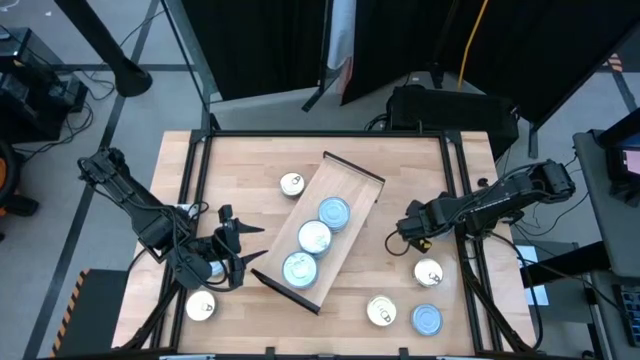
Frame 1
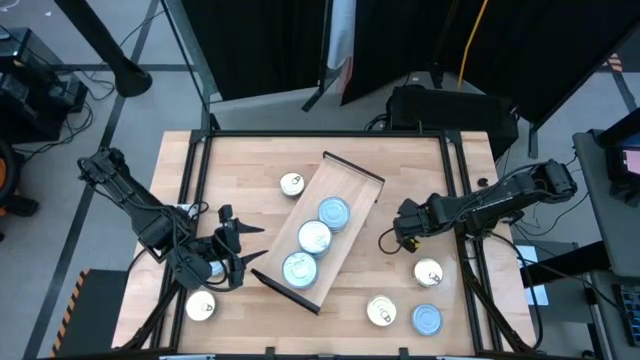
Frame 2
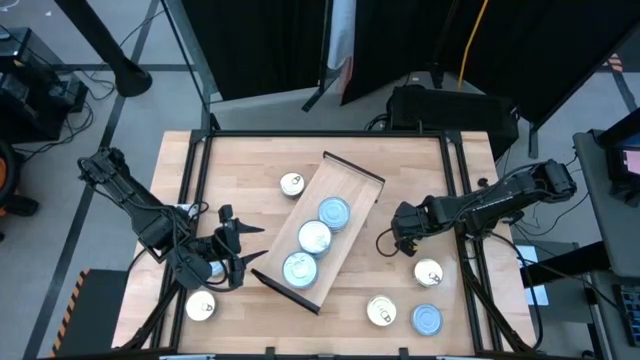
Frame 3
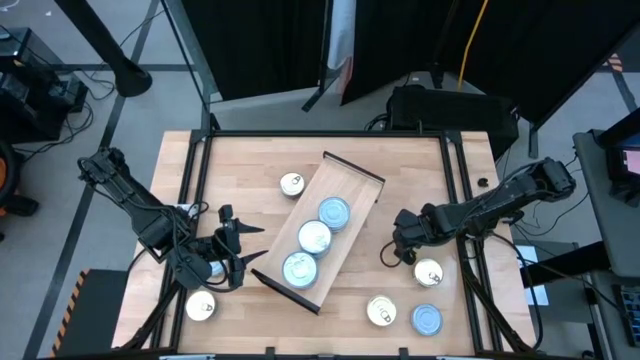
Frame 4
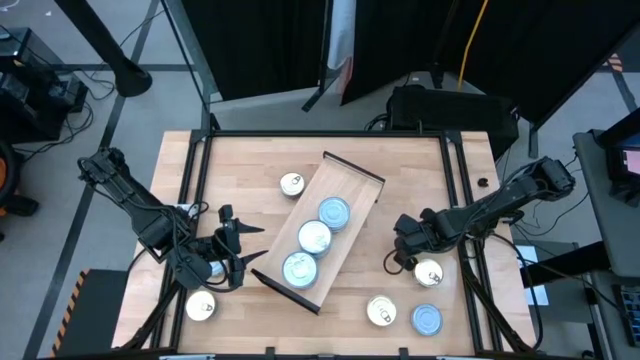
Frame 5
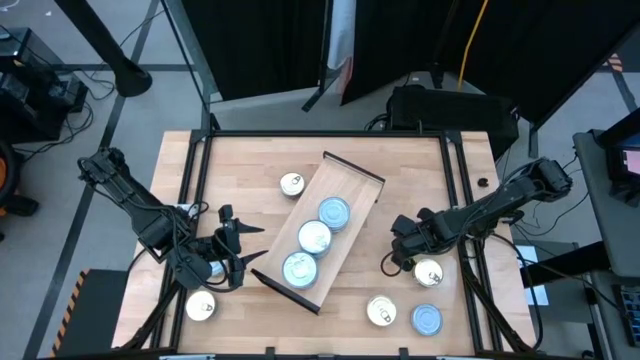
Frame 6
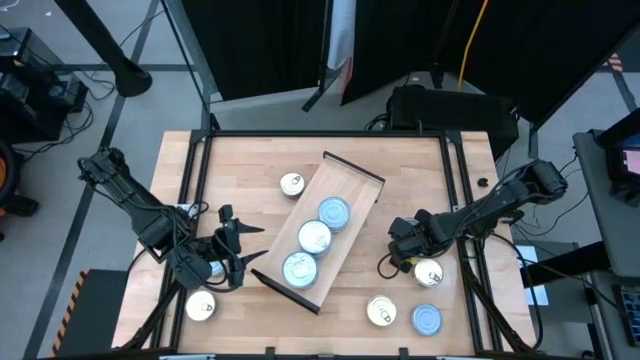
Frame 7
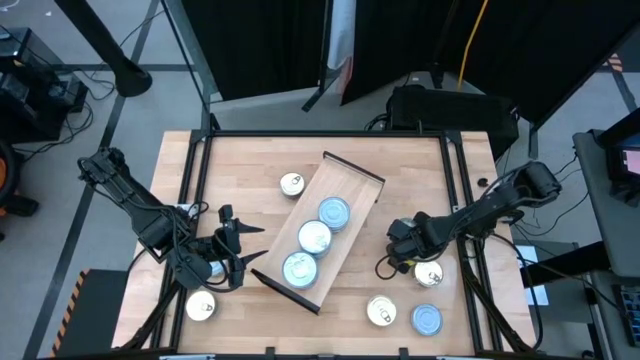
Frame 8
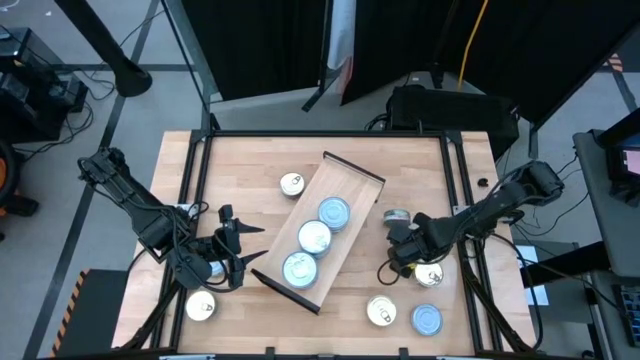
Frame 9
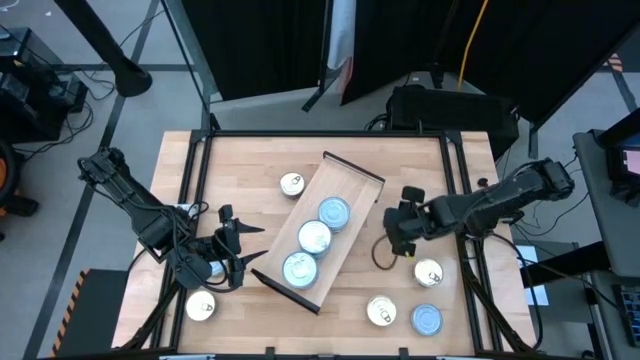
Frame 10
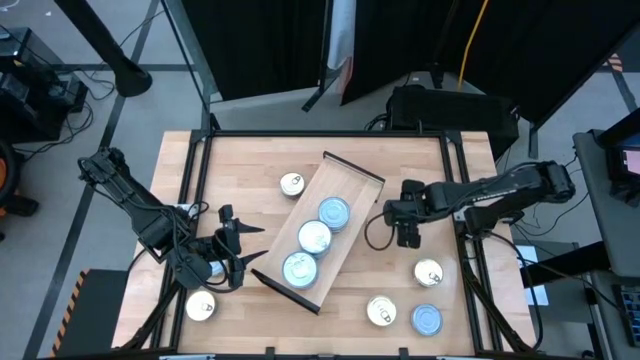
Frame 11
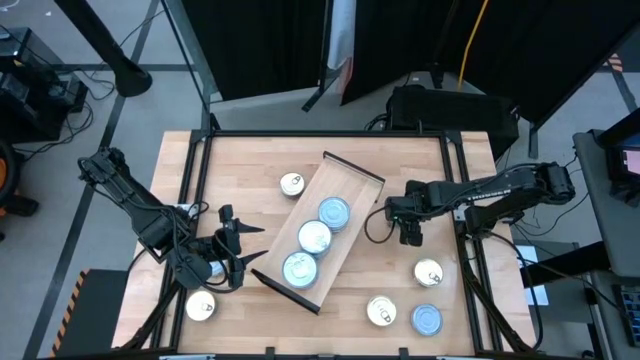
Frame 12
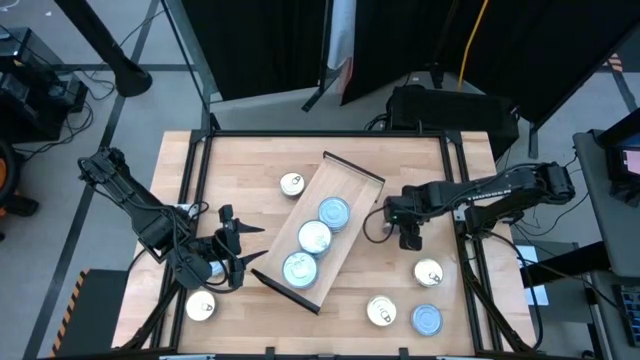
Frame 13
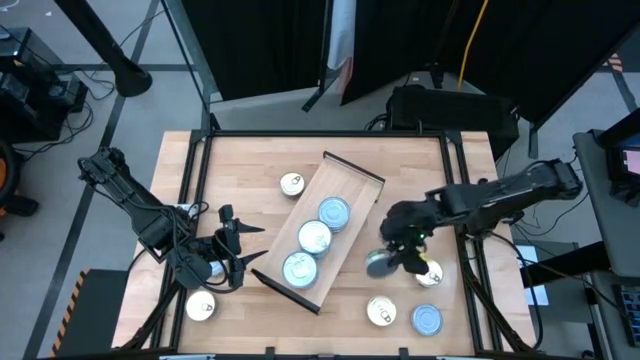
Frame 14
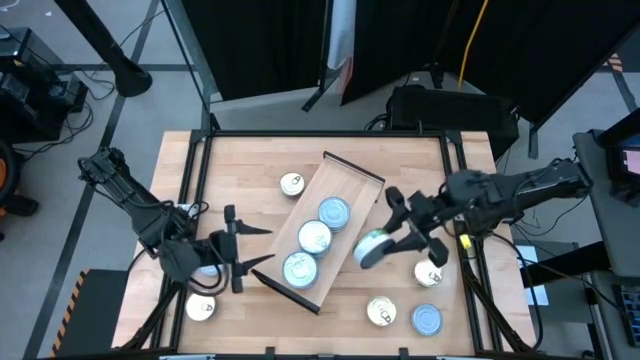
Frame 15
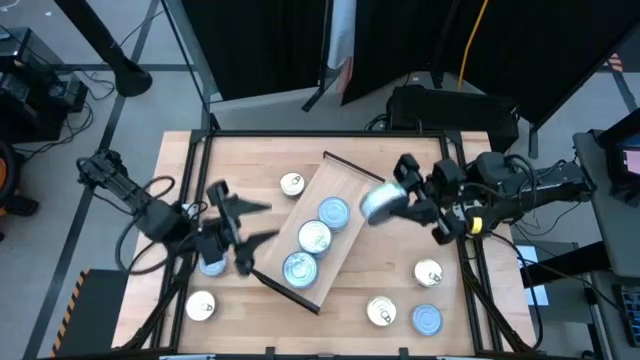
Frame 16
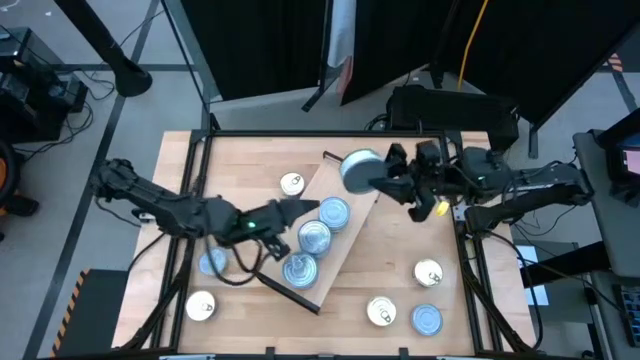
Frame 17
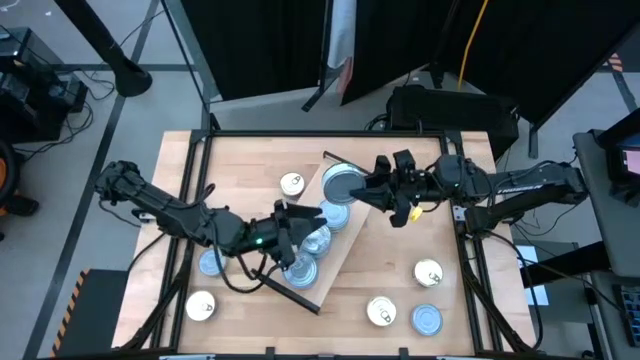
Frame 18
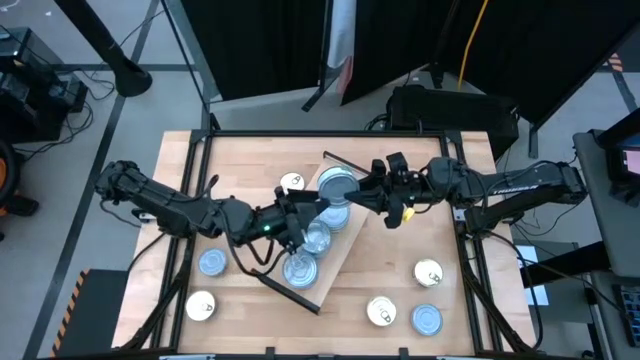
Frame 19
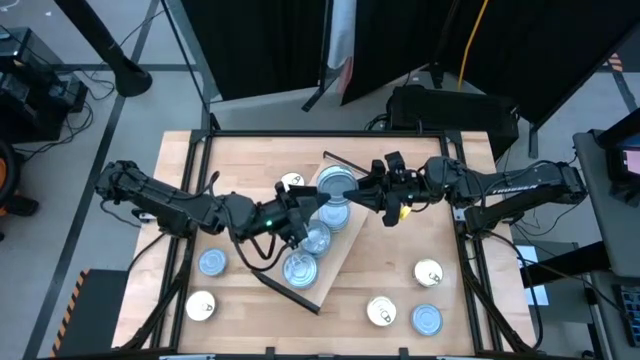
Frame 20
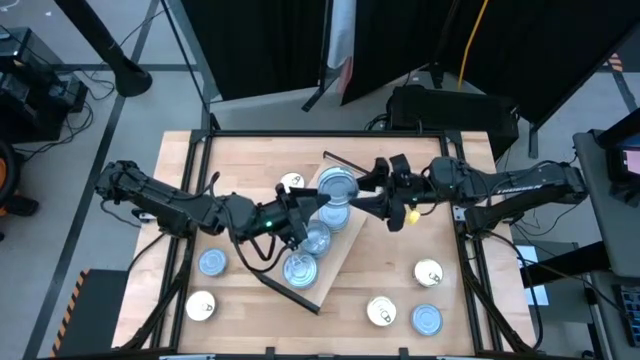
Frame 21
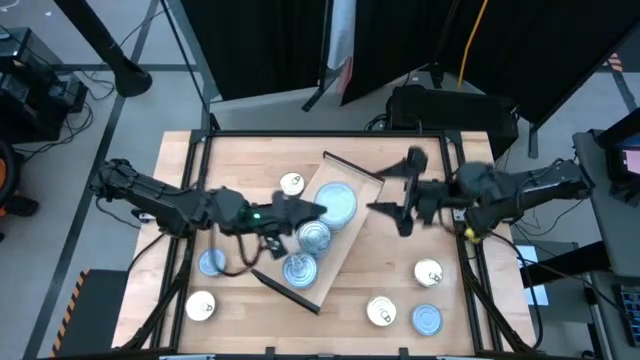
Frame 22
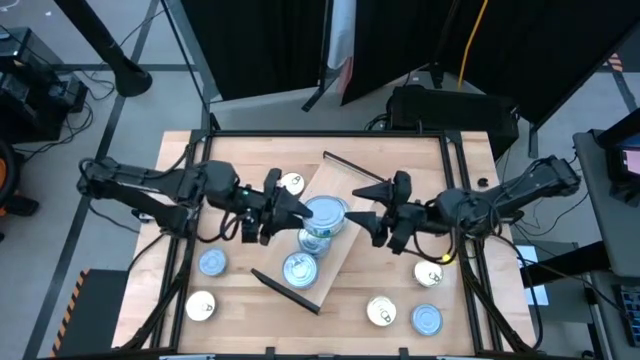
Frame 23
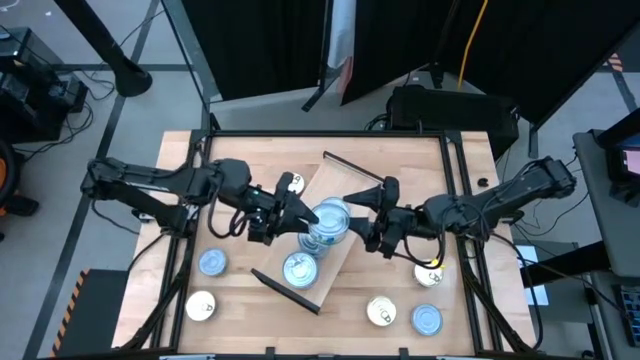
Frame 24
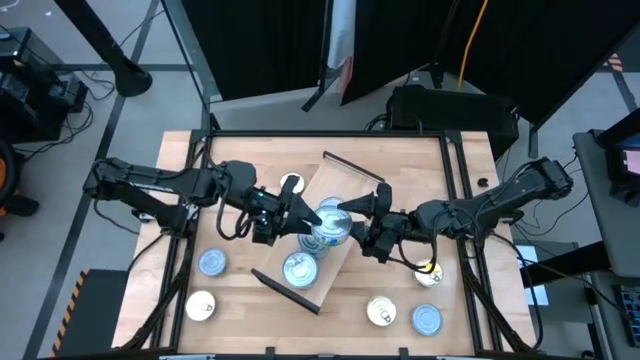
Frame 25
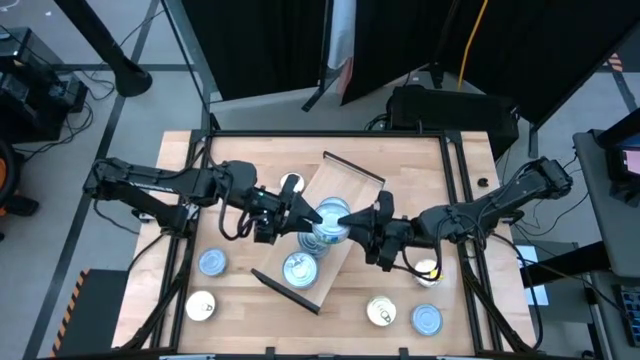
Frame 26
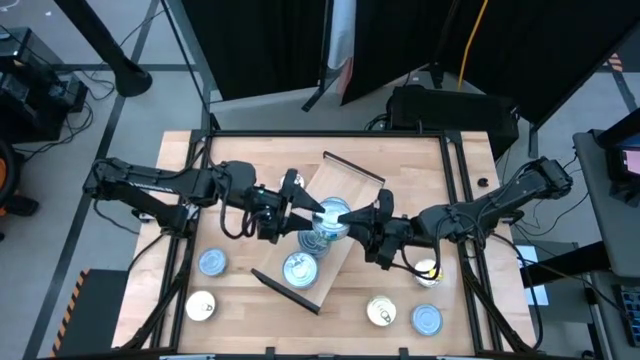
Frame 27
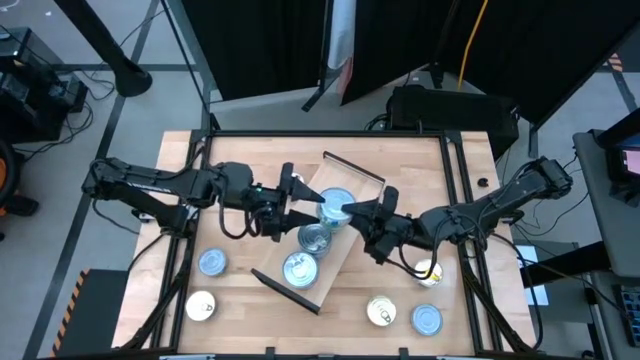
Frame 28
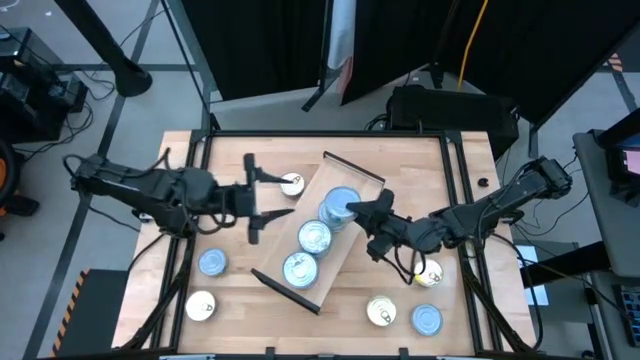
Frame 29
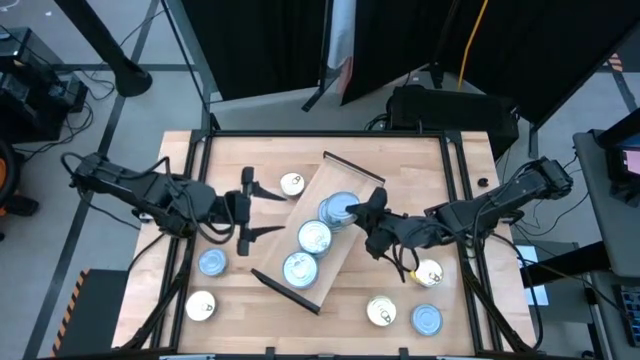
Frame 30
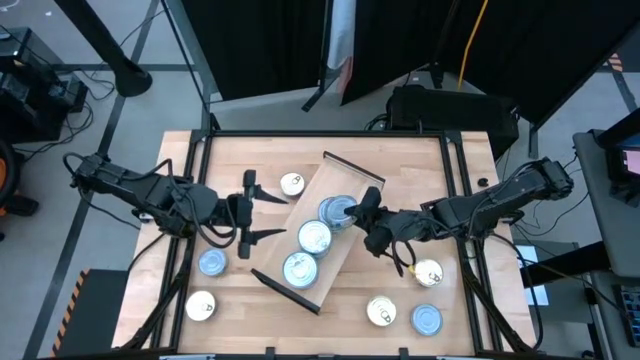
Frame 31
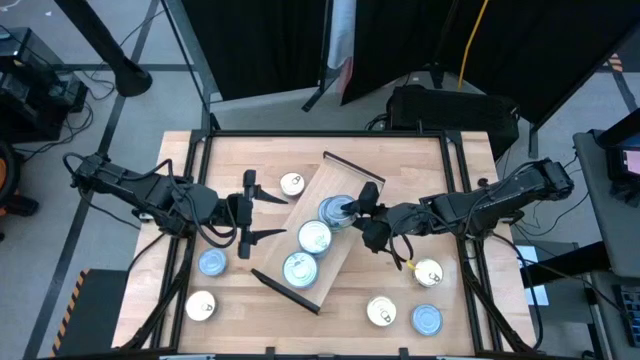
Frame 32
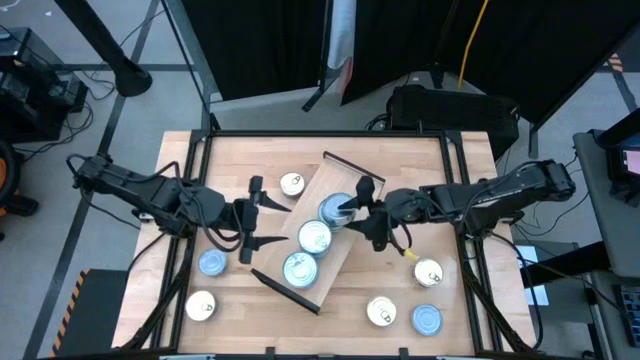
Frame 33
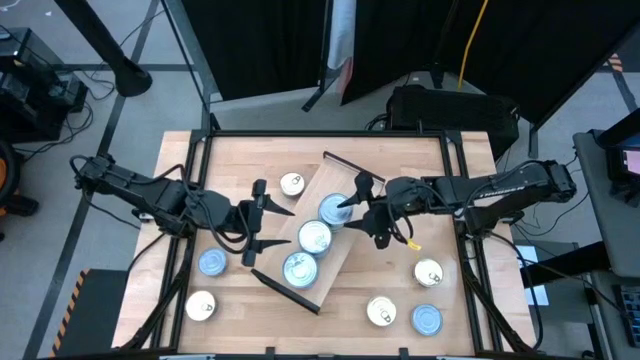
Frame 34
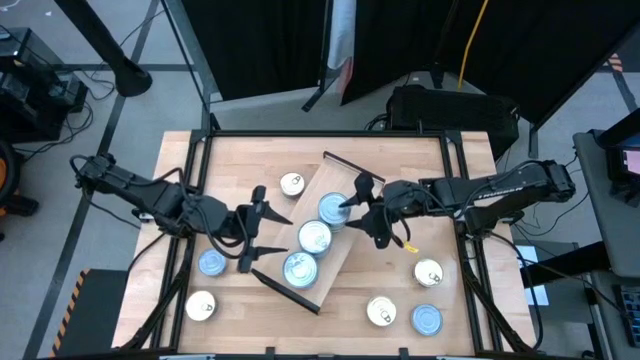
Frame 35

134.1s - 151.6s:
Task: Stack canned seafood by type on shelf
Stack the green tuna can on top of the other green tuna can on the shelf

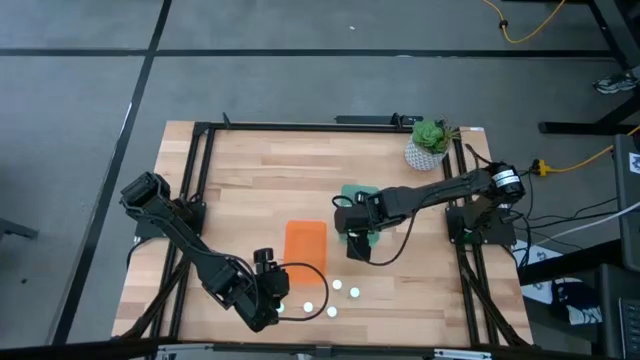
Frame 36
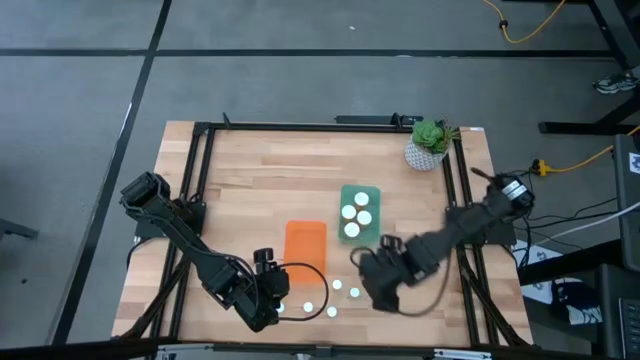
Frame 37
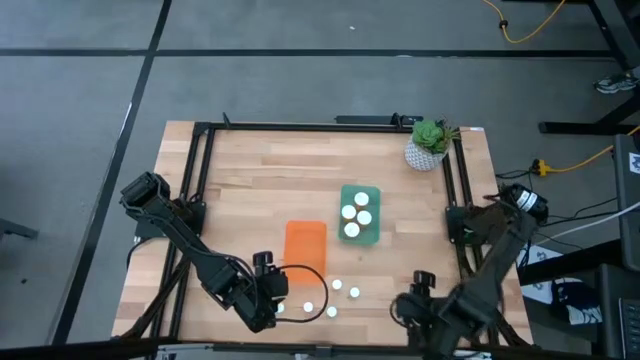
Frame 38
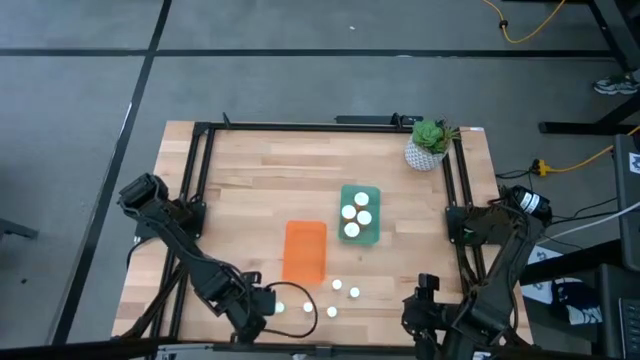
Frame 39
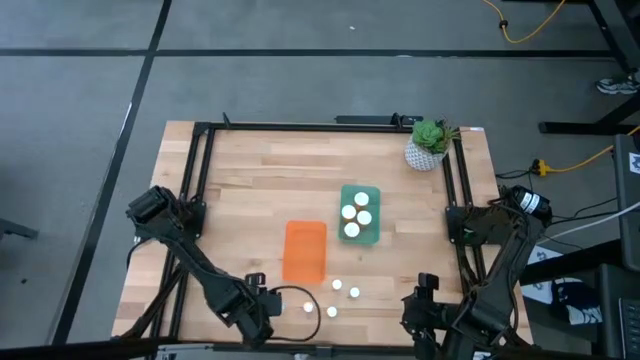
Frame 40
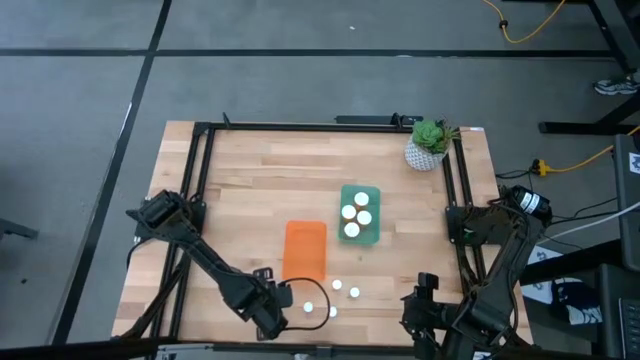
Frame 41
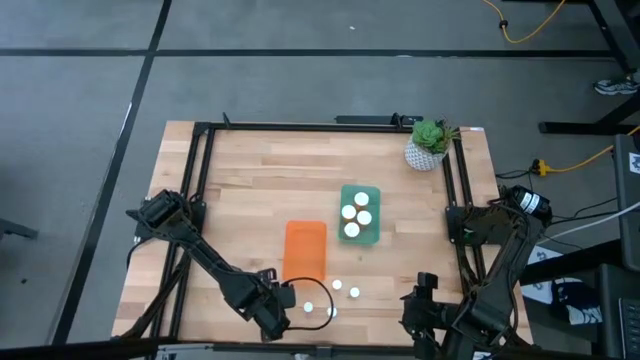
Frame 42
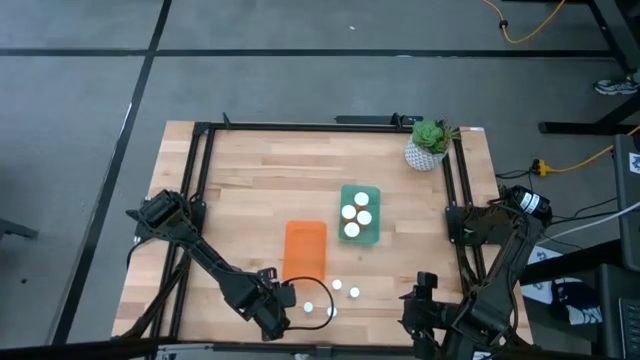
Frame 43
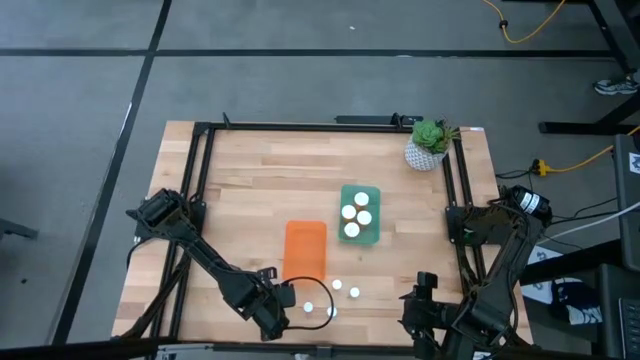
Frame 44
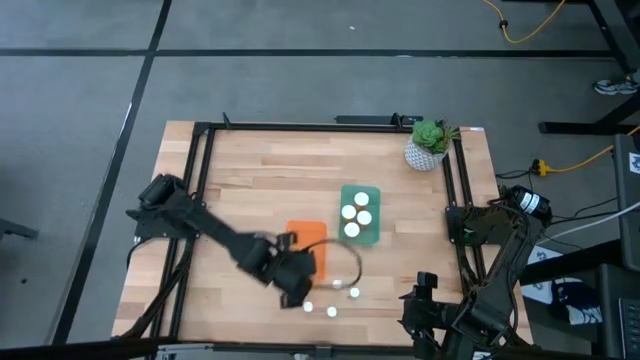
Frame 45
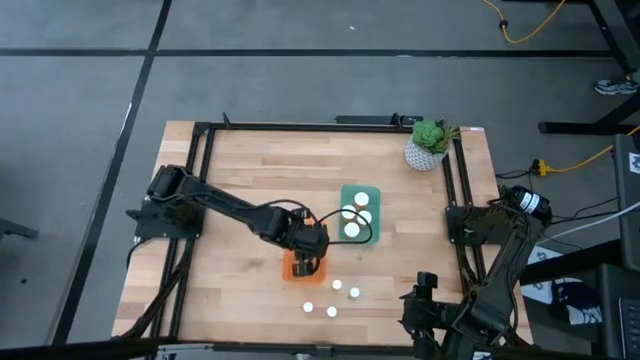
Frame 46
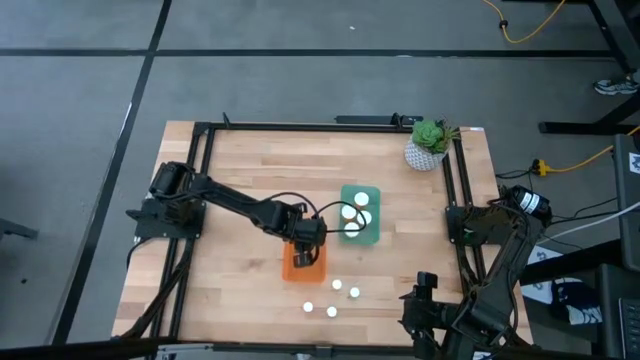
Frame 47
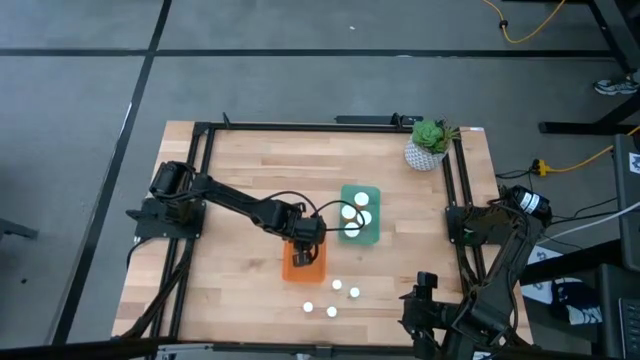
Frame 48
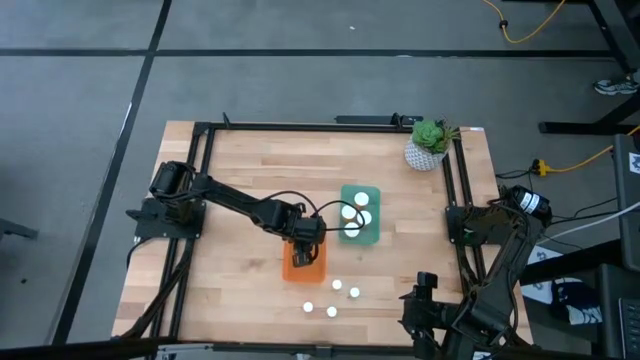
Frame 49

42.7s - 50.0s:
Task: Pick and place medicine bottles into bin by pill shape (circle, oval)
Put the small yellow tablet bottle into the orange bin
